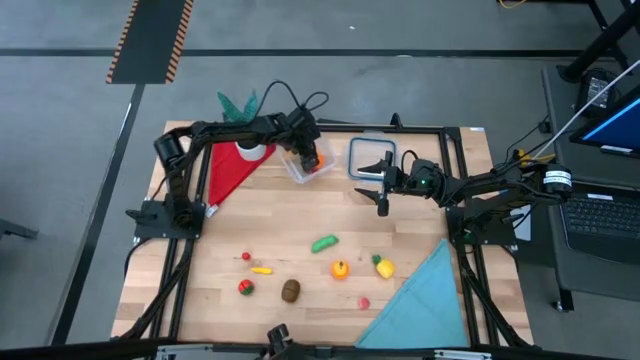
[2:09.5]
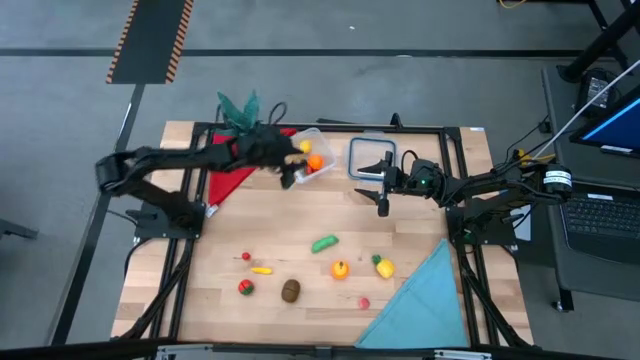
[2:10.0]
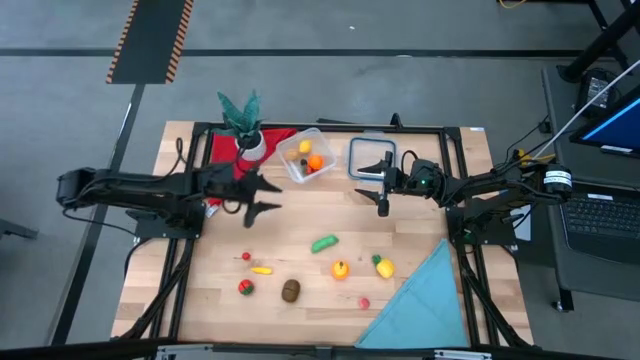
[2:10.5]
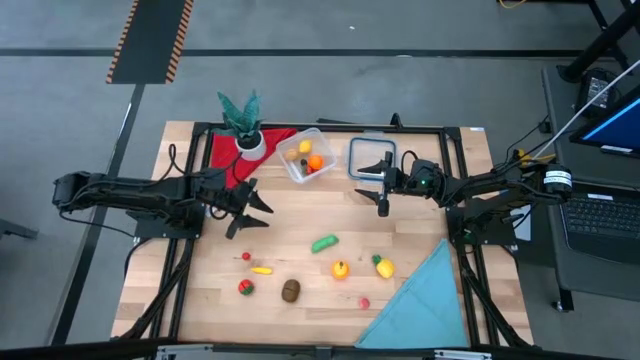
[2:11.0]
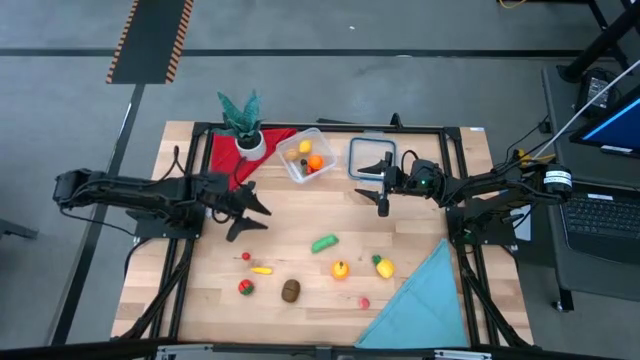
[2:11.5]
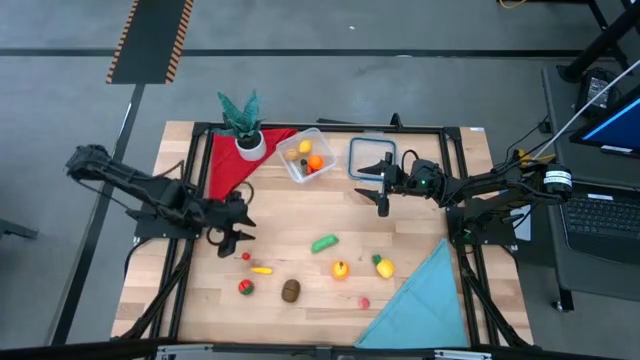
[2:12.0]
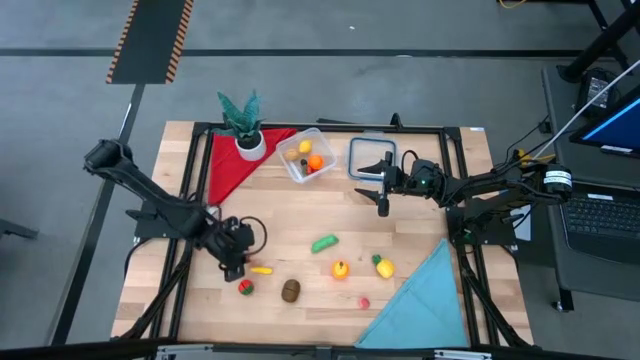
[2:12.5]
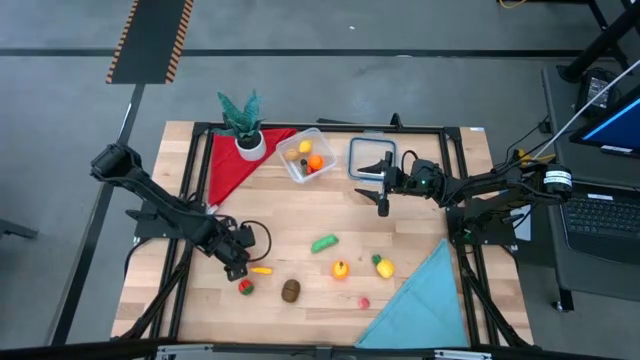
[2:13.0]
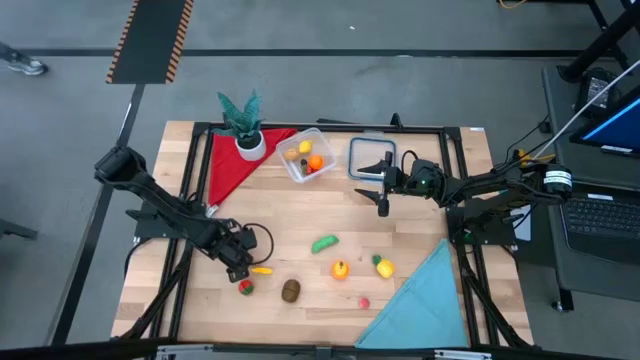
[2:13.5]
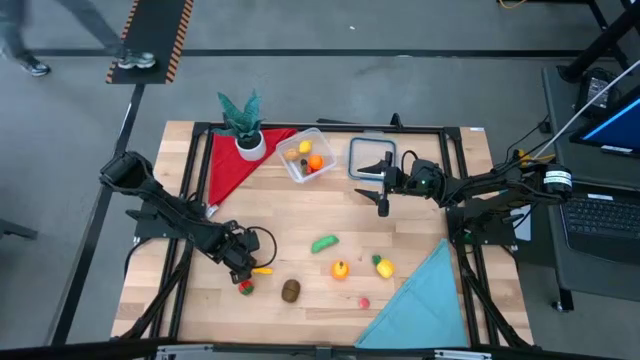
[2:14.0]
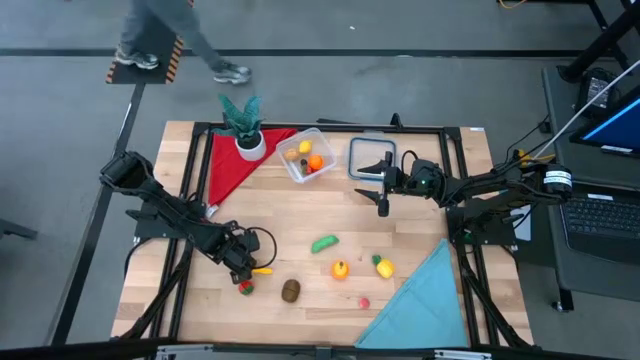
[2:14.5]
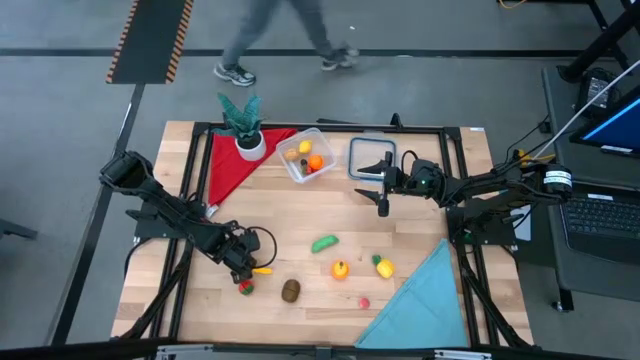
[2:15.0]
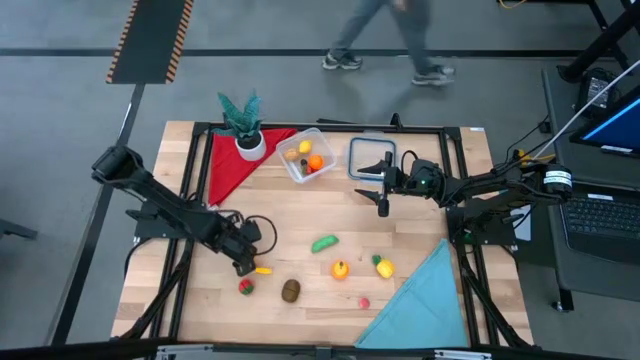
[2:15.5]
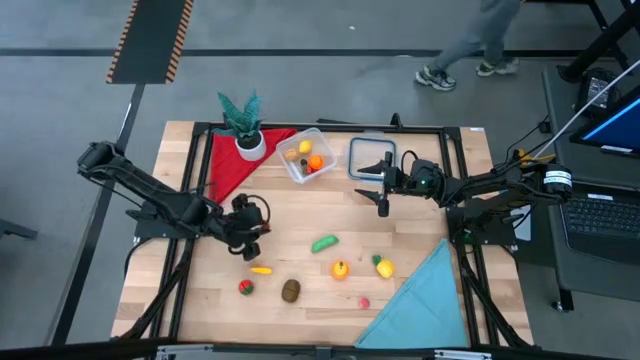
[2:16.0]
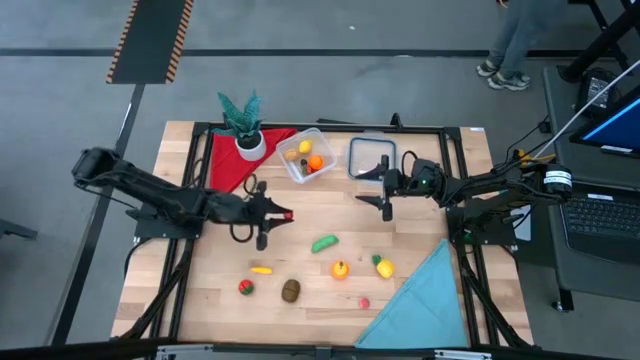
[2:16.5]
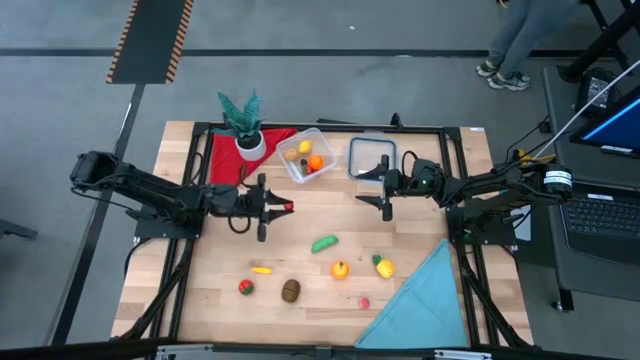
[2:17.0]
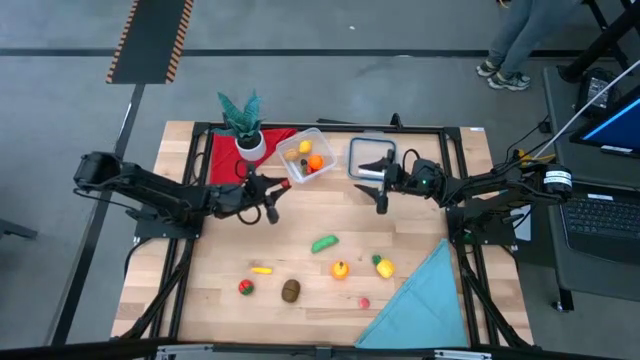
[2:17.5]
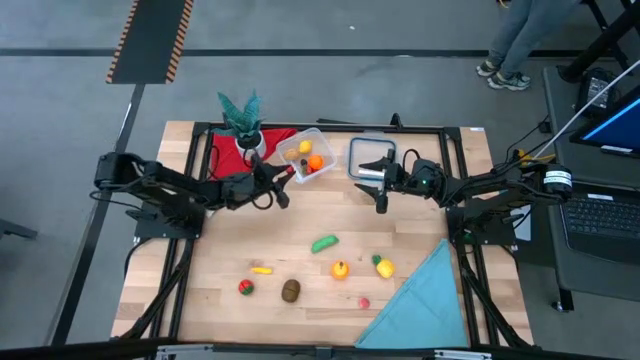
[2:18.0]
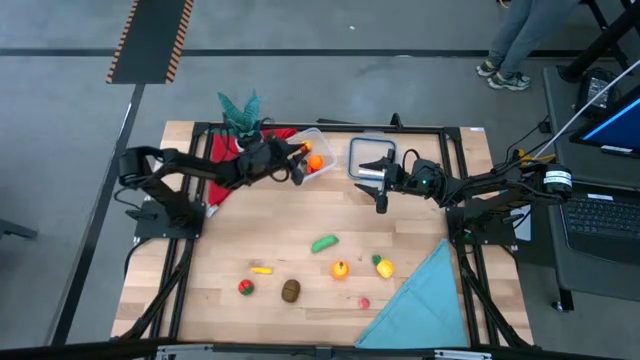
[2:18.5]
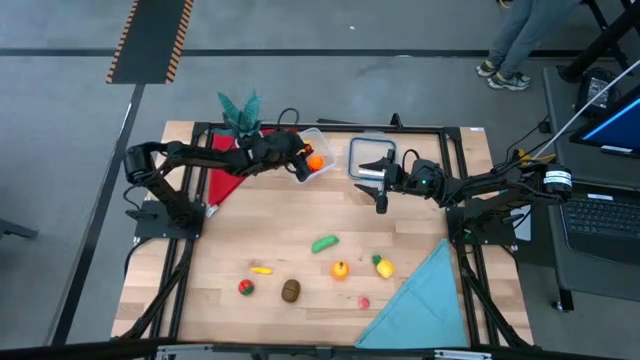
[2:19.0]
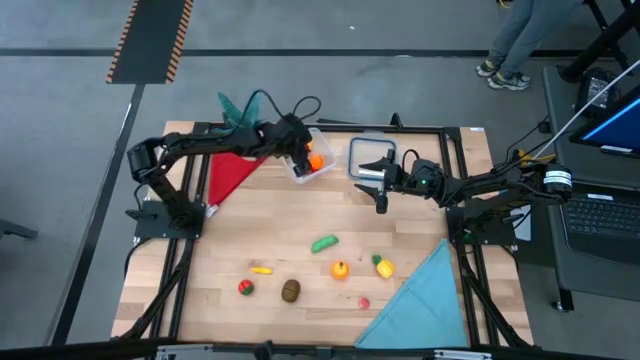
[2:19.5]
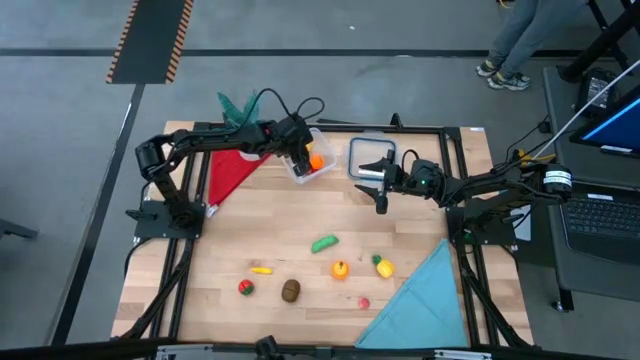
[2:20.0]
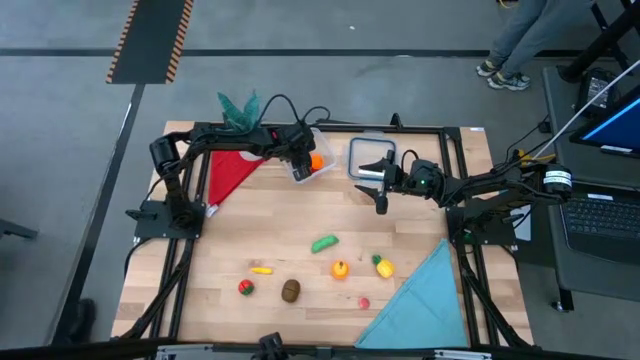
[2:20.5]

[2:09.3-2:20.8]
Task: Pick and placing Produce into tupperware
Put the cherry into the transparent bin

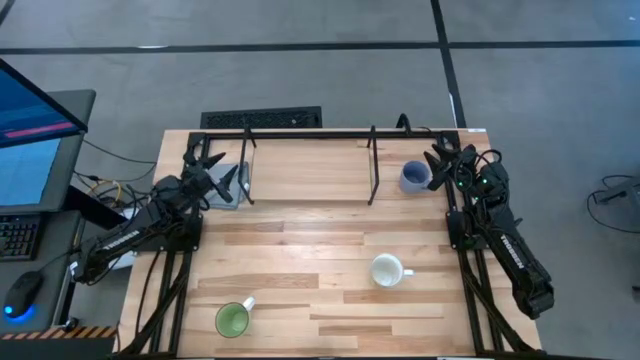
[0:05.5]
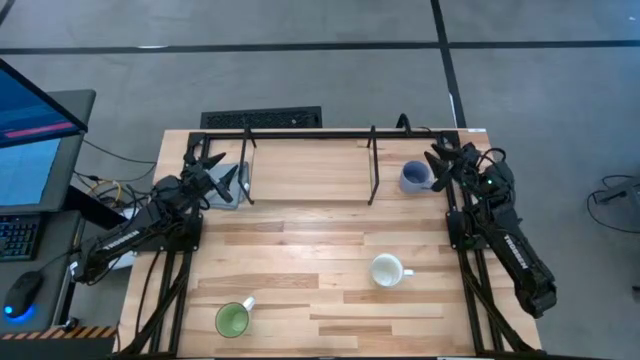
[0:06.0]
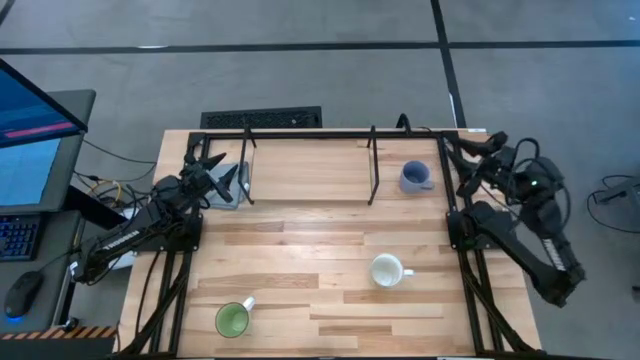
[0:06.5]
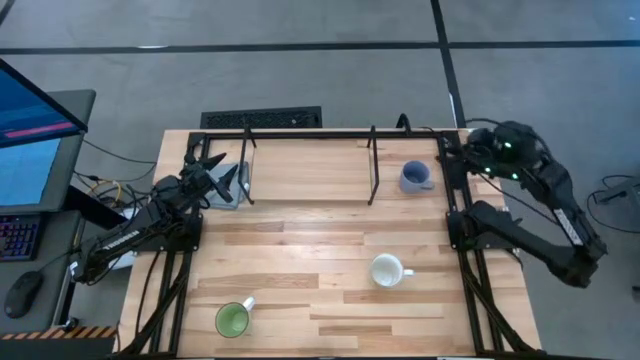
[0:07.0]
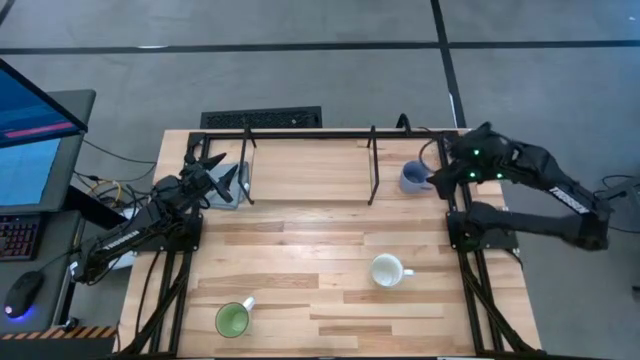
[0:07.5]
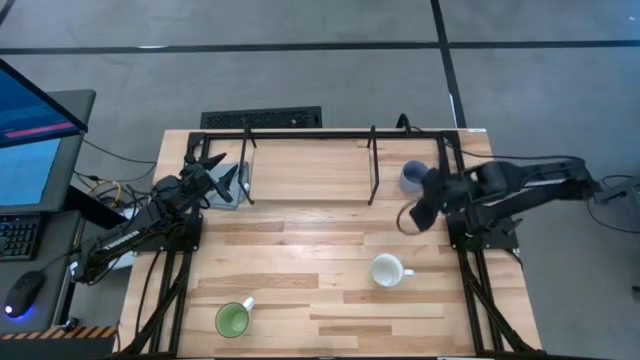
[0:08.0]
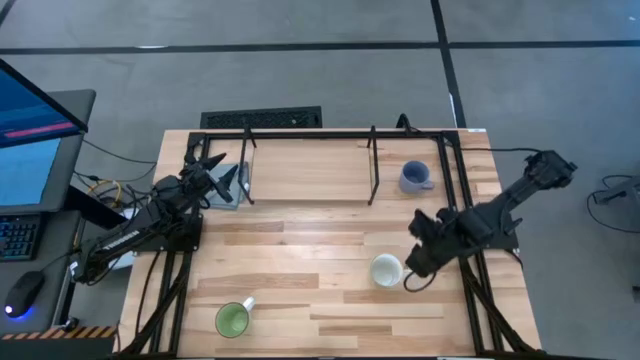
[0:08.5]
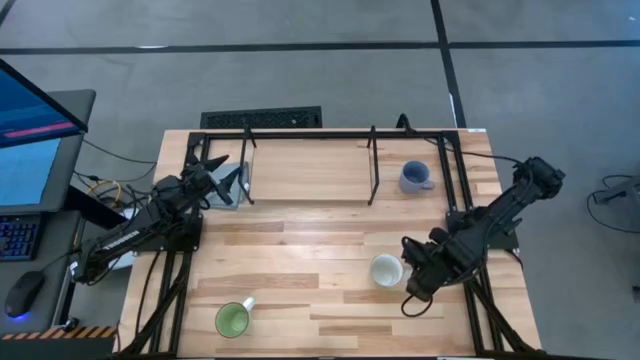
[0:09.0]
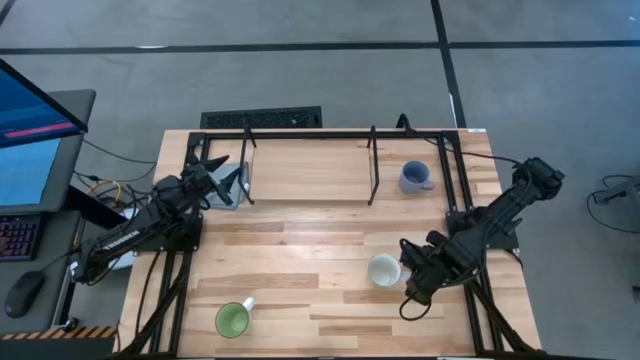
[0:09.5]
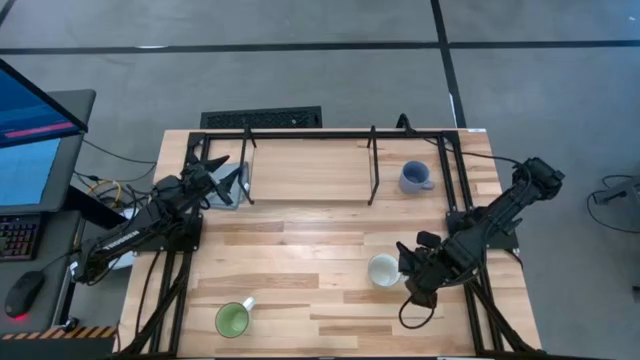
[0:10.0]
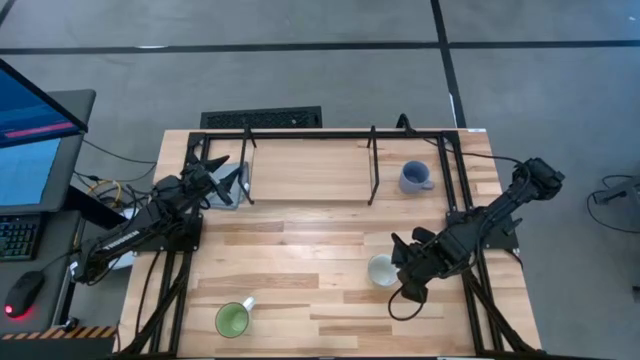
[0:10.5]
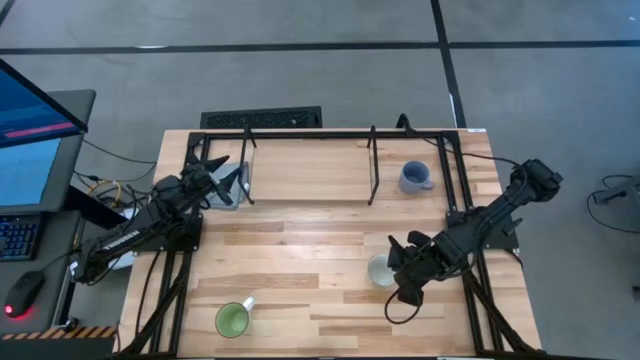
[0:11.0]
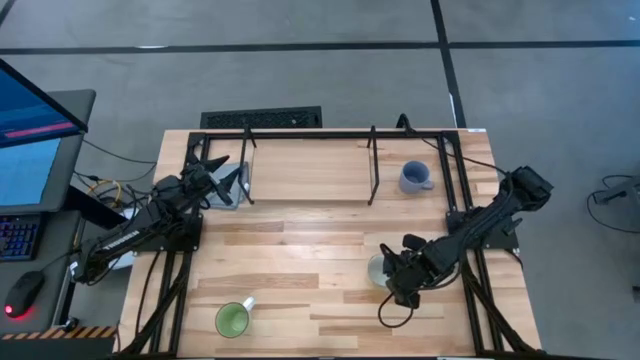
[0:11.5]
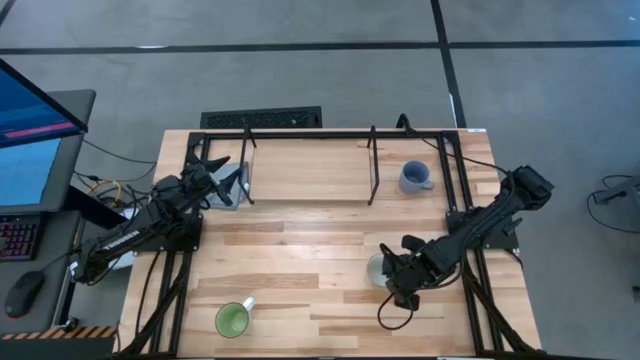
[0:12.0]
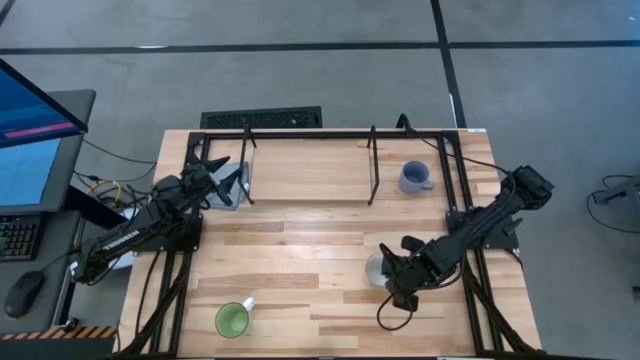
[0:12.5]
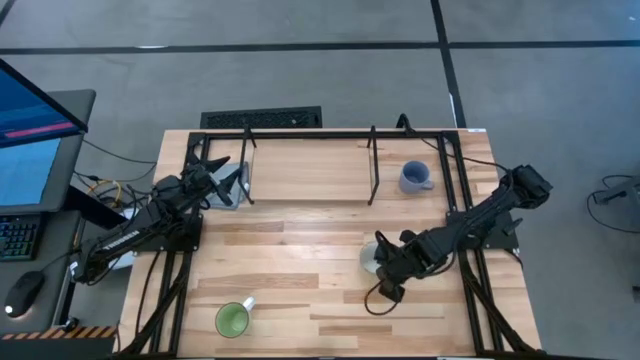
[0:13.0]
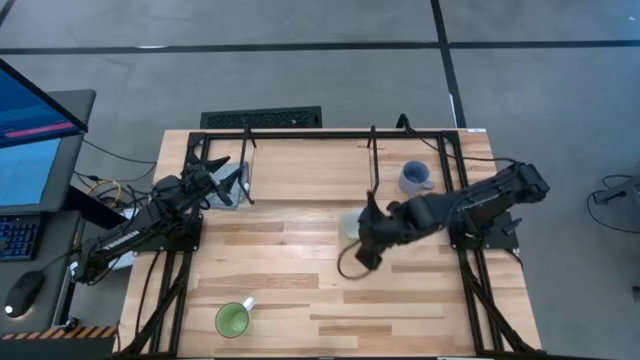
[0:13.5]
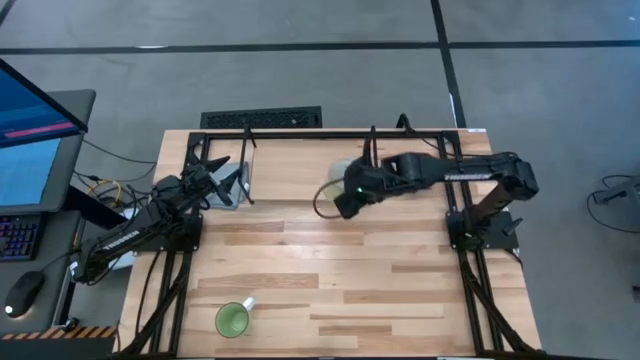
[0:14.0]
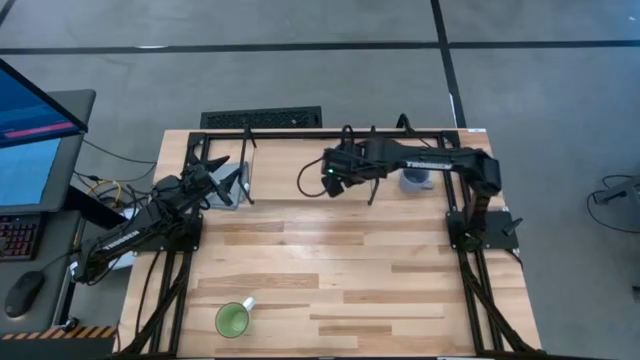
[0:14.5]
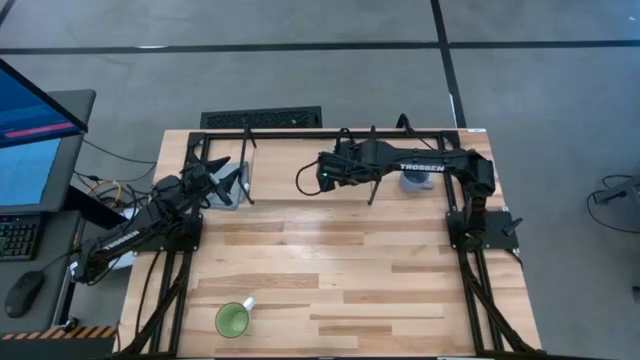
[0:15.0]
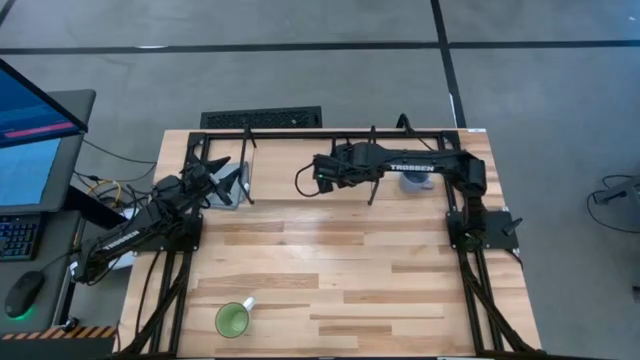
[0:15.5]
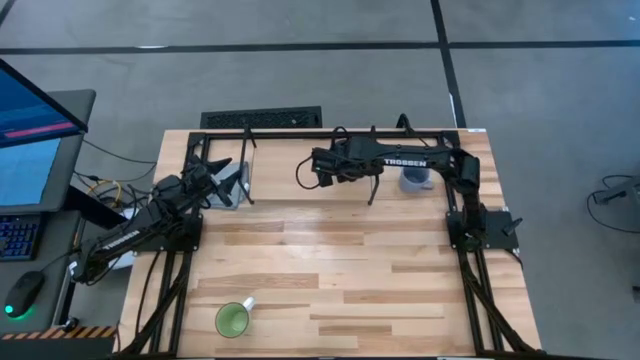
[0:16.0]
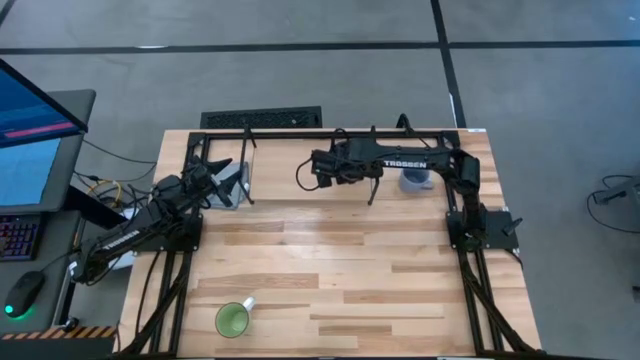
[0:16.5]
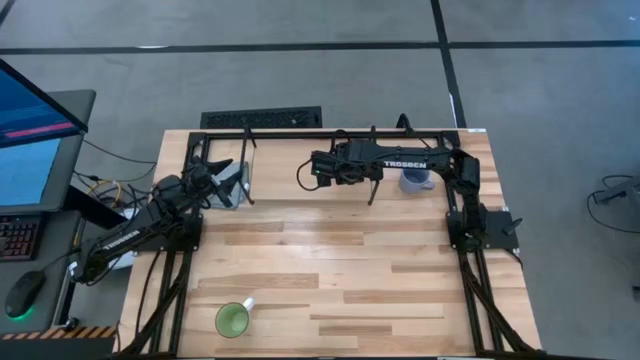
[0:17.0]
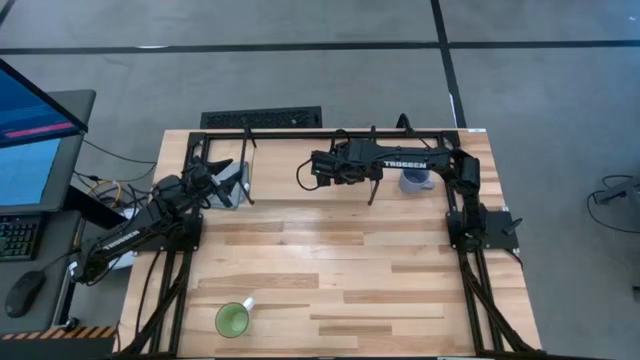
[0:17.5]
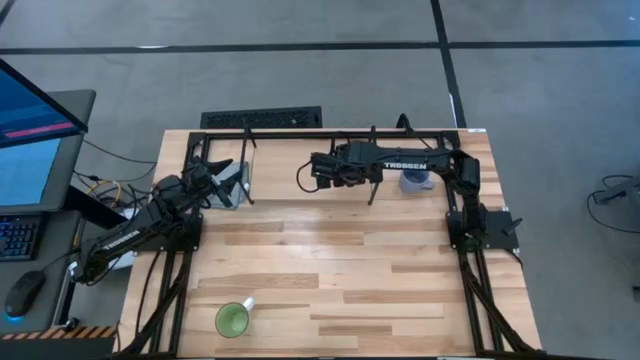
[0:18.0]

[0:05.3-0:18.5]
Task: Stack small to large cups/mugs on shelf
Put the light green mug on the shelf
